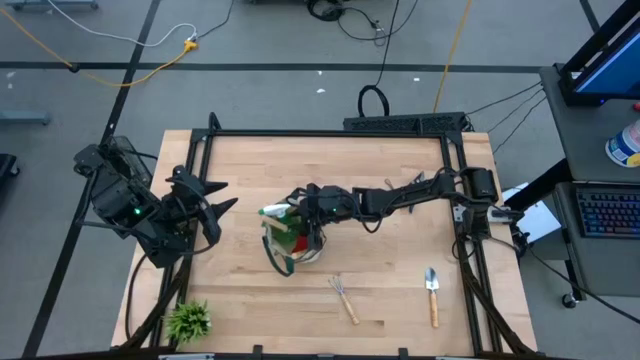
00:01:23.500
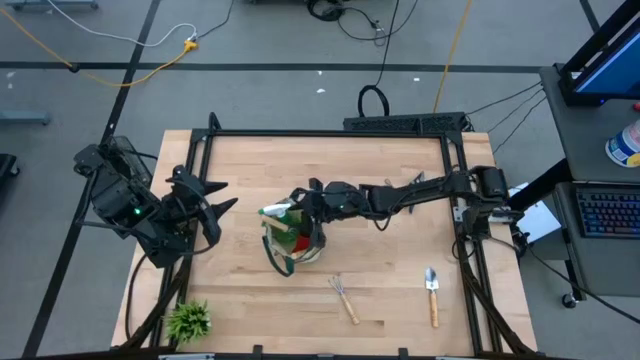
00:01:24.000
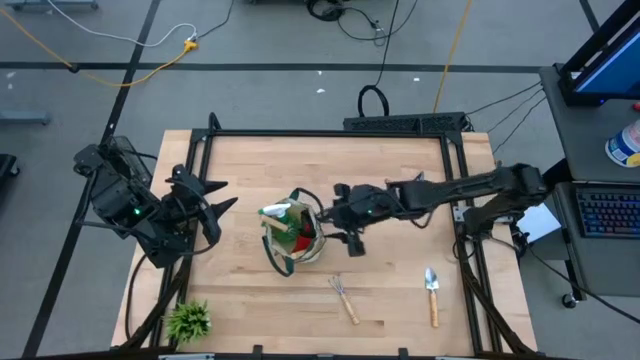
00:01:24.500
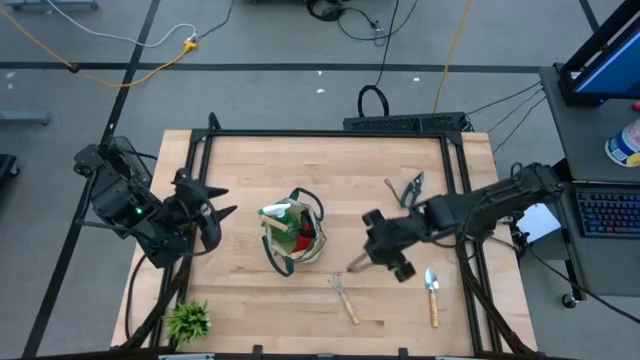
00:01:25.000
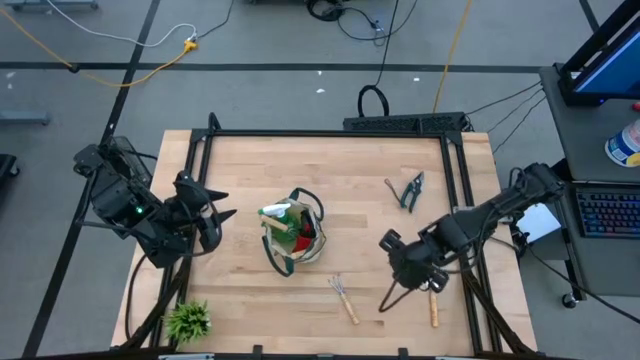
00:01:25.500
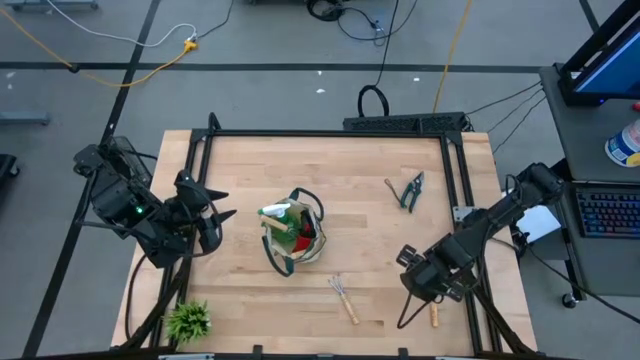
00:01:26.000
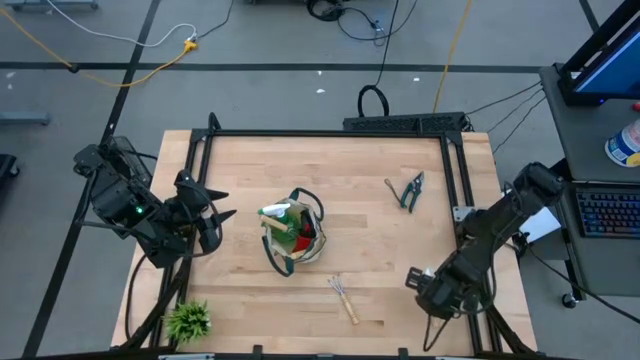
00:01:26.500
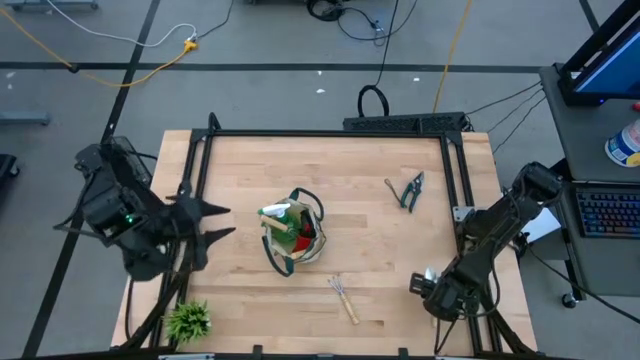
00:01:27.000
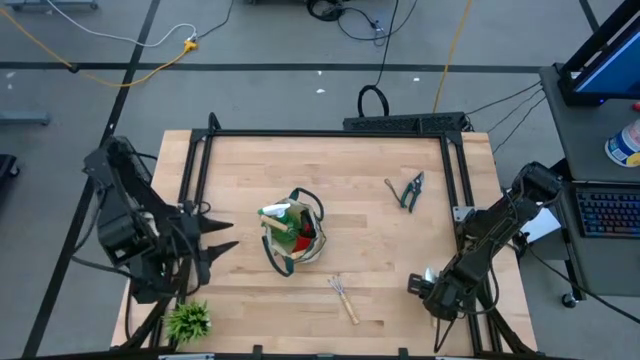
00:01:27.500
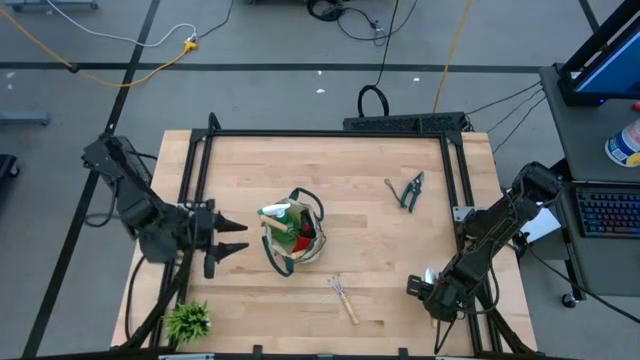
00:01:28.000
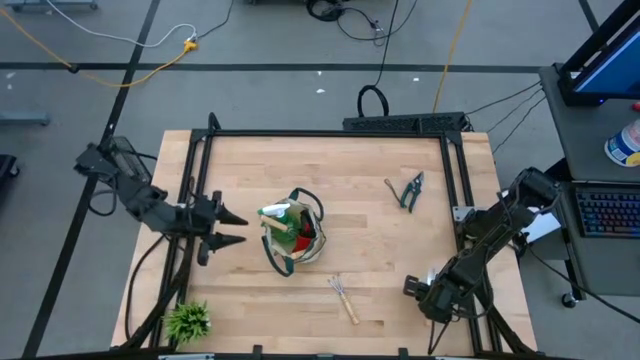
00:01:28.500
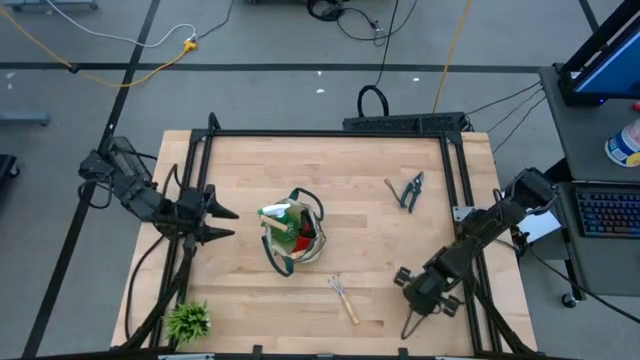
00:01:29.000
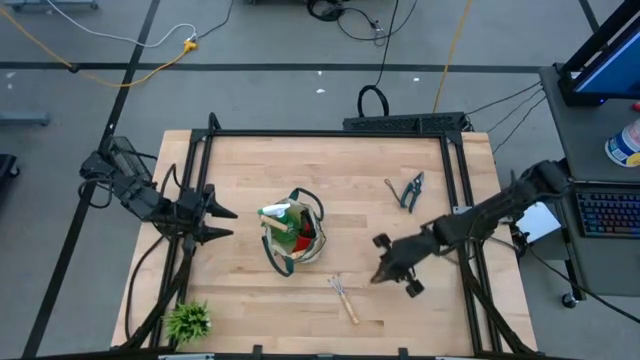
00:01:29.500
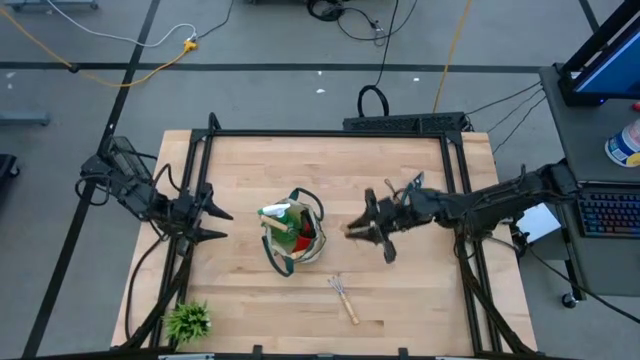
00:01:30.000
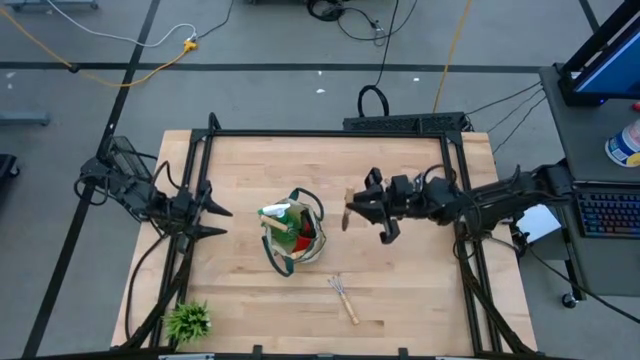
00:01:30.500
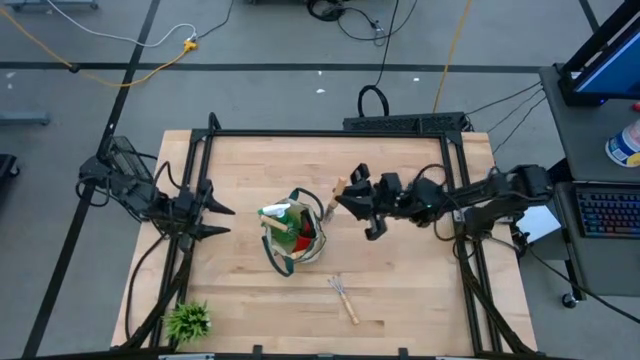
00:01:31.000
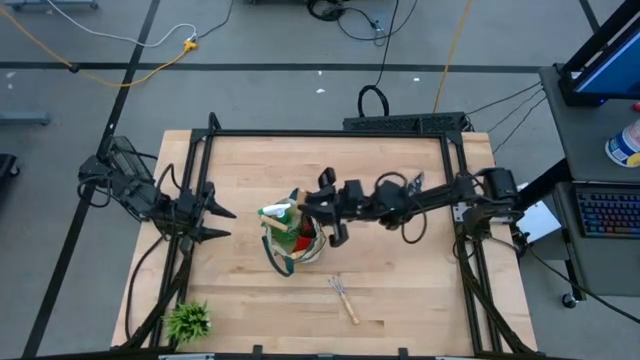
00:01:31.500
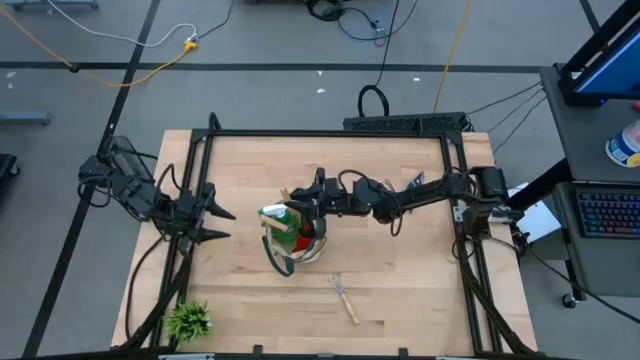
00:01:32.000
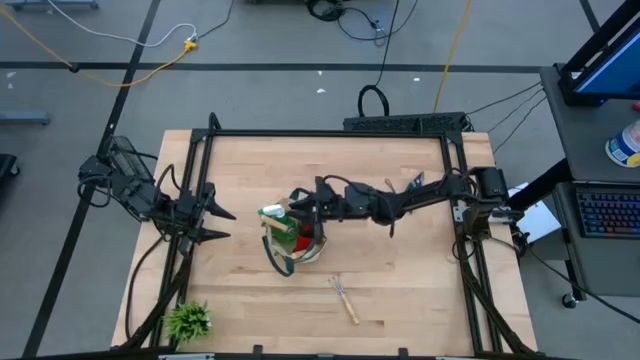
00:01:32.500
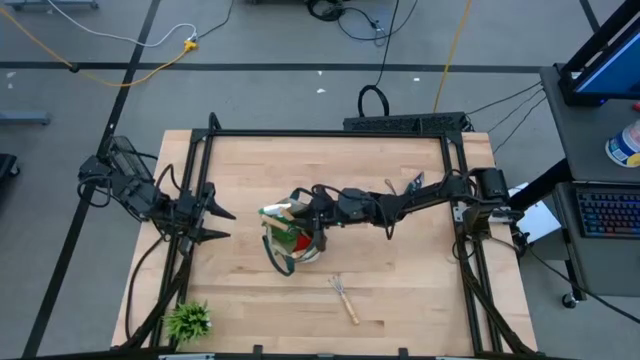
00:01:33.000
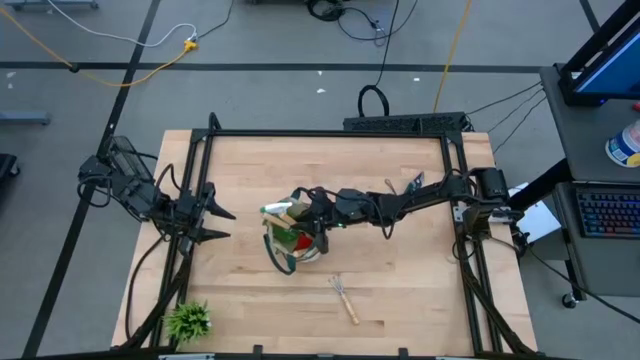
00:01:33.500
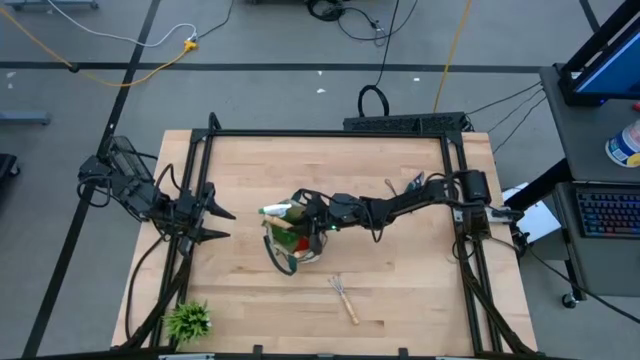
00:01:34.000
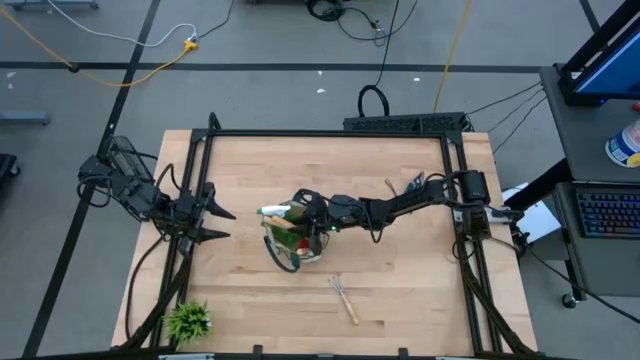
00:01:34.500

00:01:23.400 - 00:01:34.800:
Task: Pick & Place Garden tools in Gardening bag
Put the trowel into the gardening bag

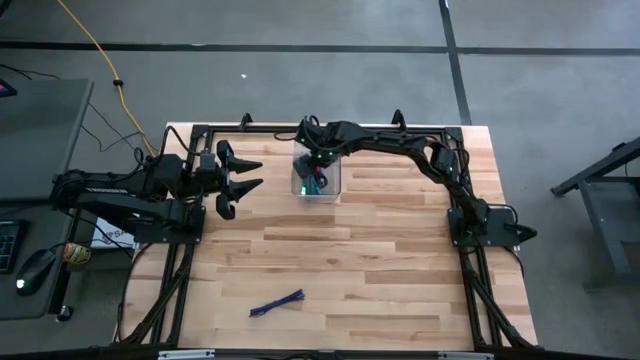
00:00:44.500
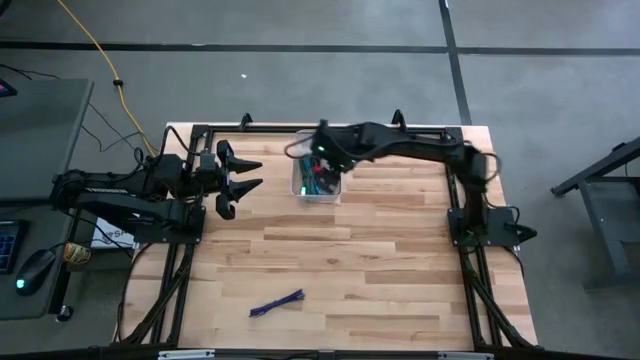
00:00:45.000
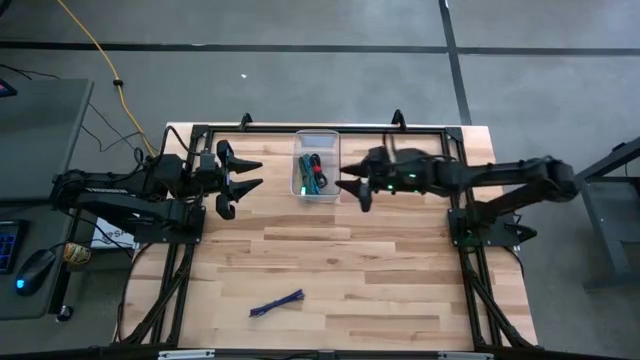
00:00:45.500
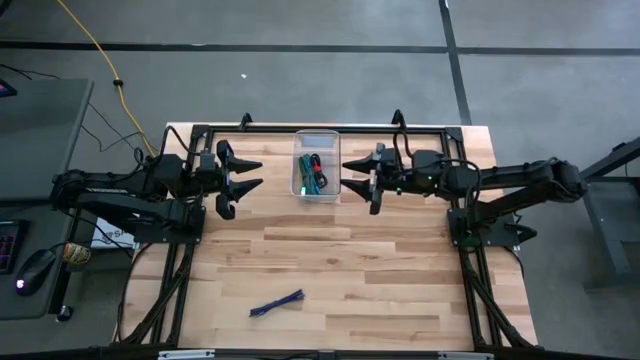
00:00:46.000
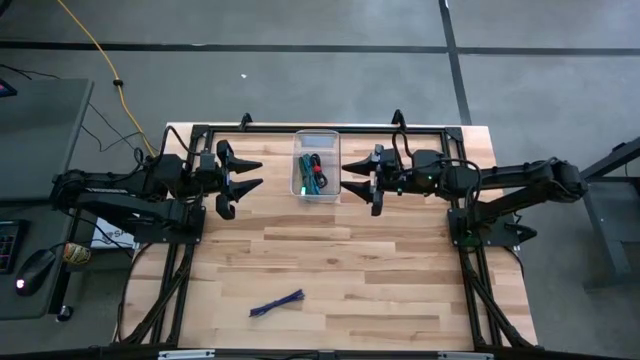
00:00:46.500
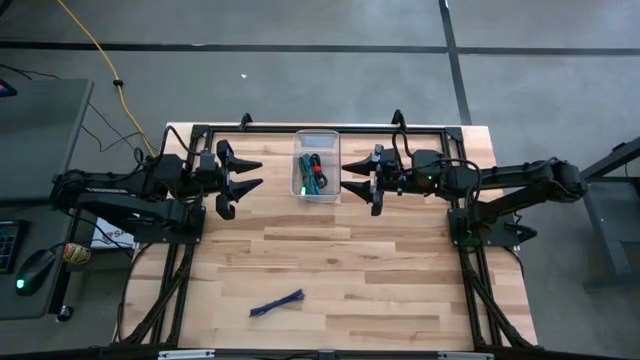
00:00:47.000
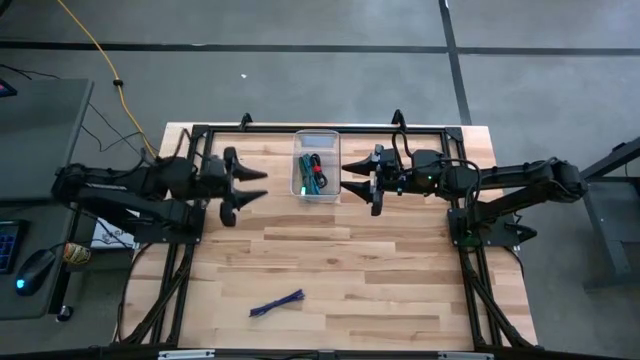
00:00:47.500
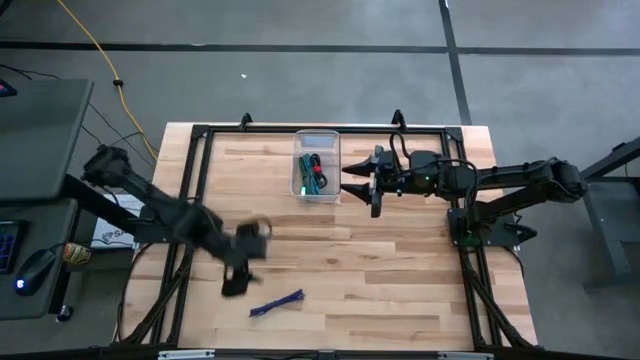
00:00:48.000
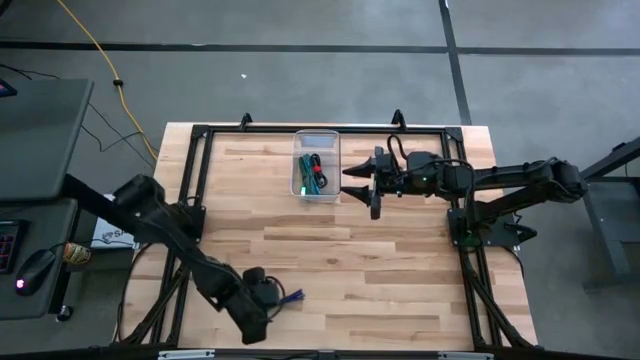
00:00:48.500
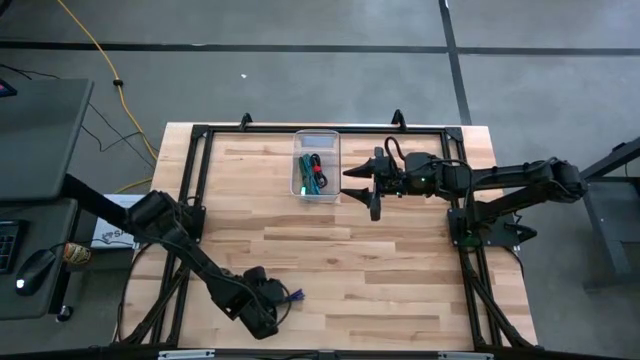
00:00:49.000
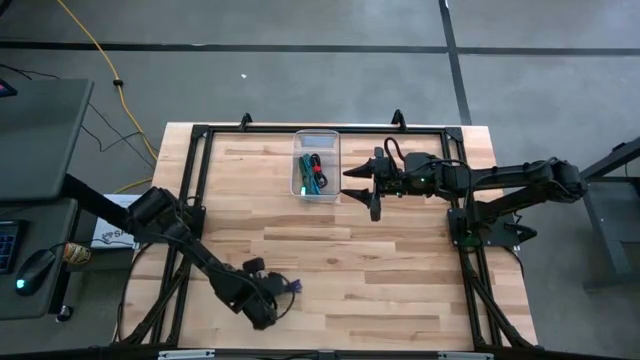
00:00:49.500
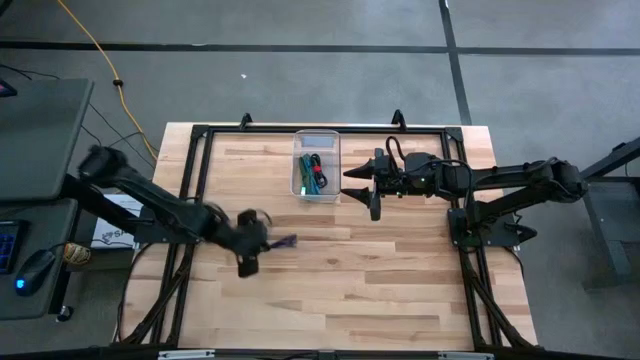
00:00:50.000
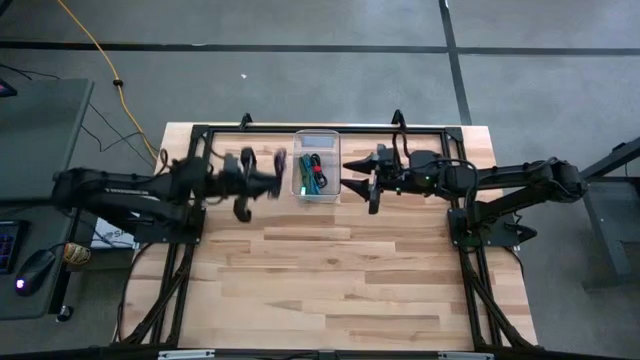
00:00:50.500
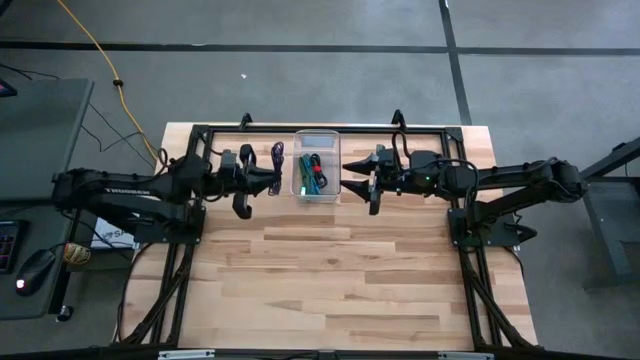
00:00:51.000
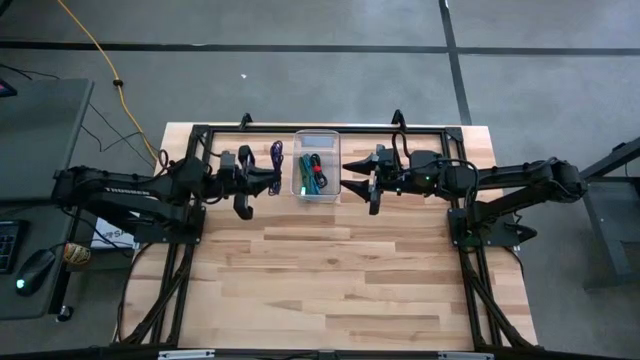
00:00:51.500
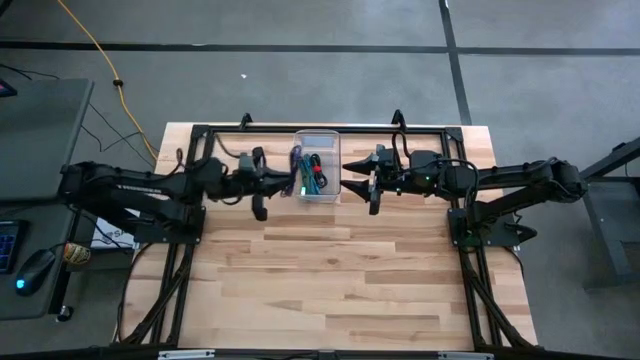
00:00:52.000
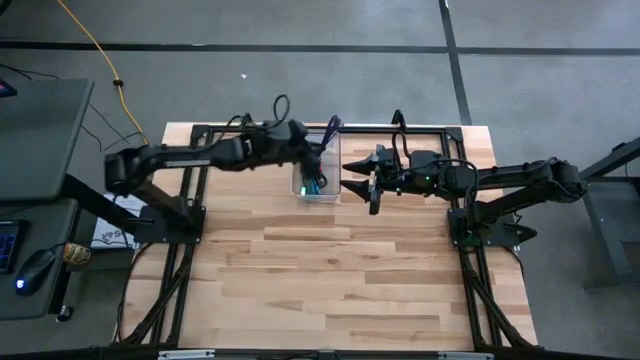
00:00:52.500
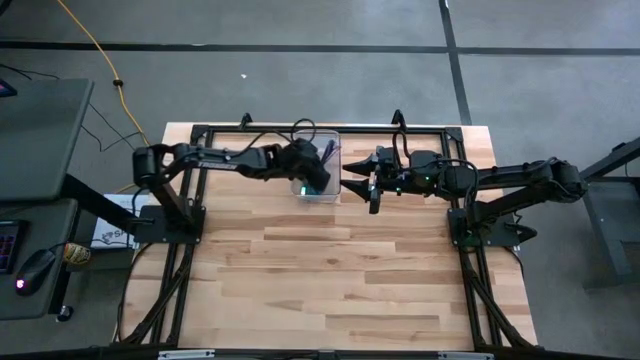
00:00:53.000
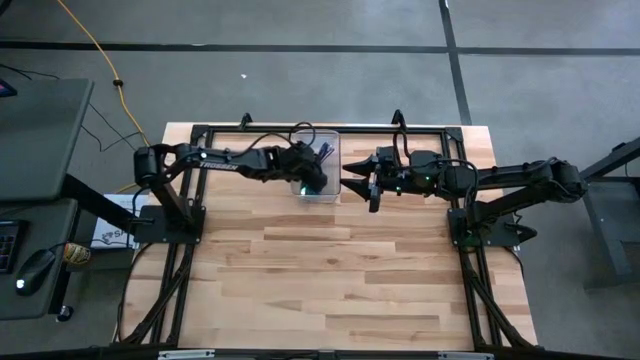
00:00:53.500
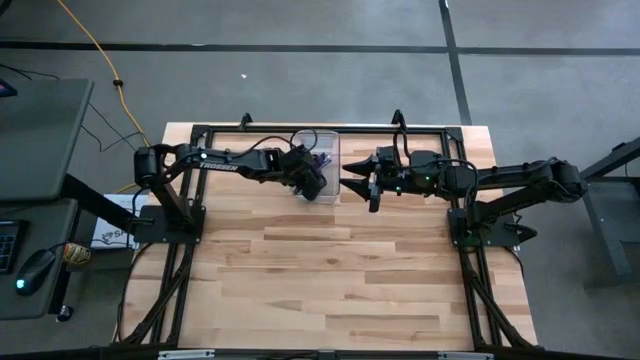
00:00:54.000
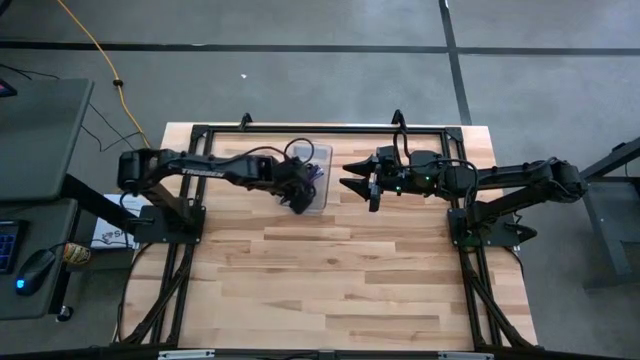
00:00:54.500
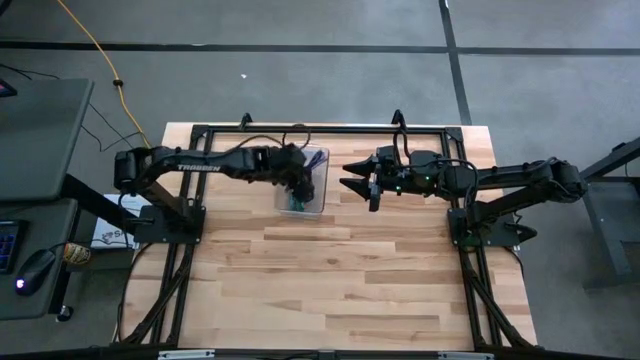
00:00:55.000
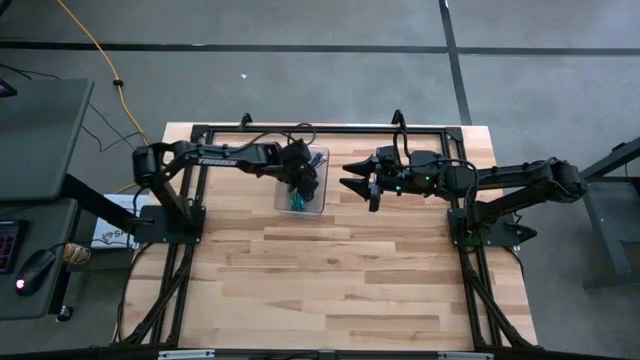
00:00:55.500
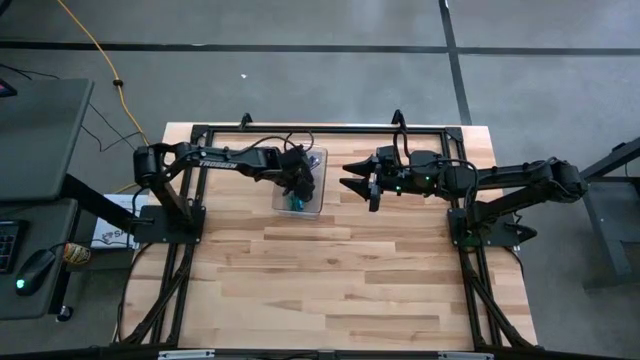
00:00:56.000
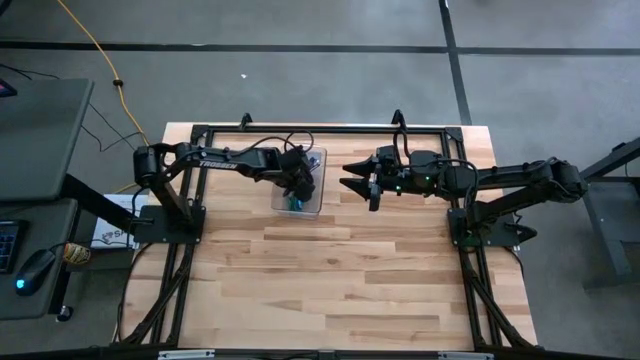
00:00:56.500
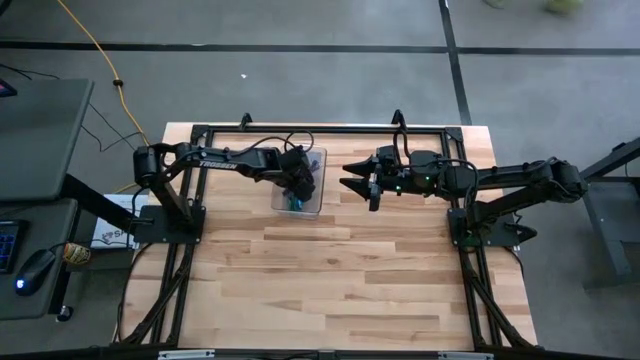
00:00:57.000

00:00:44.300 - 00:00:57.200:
Task: Pick and place USB-C Cables
Put the purple charger cable into the transparent bin
